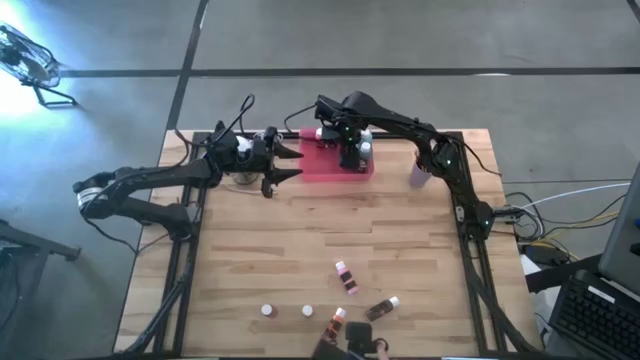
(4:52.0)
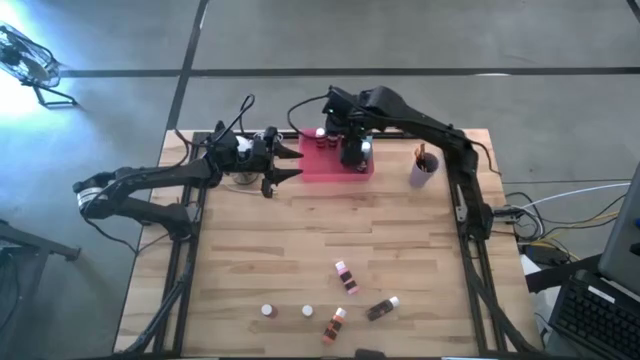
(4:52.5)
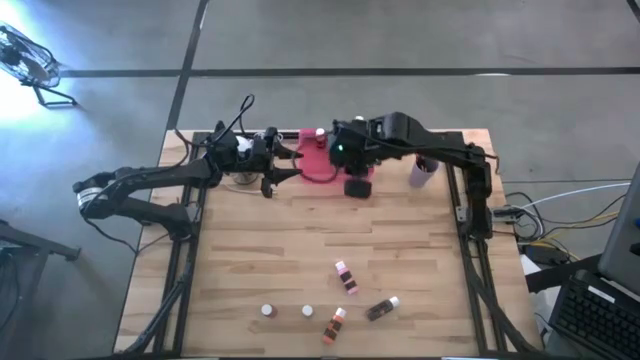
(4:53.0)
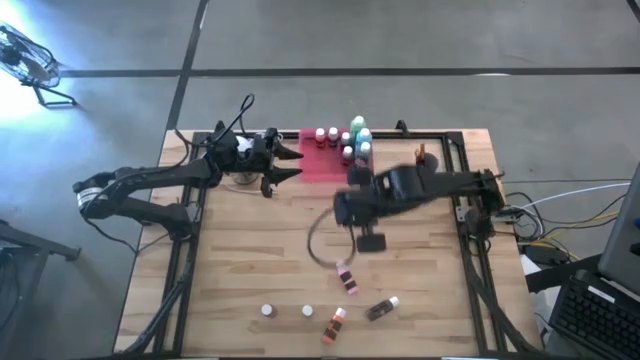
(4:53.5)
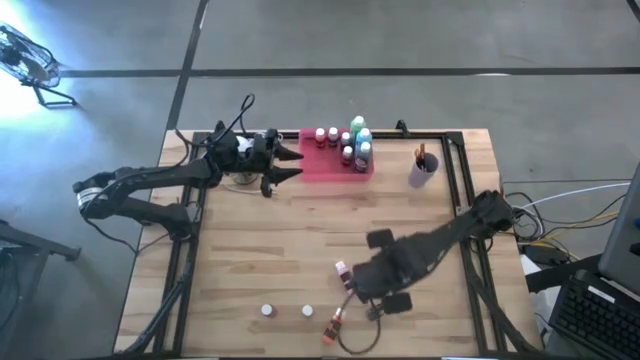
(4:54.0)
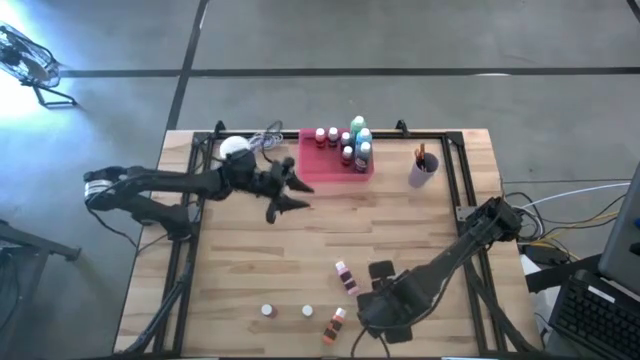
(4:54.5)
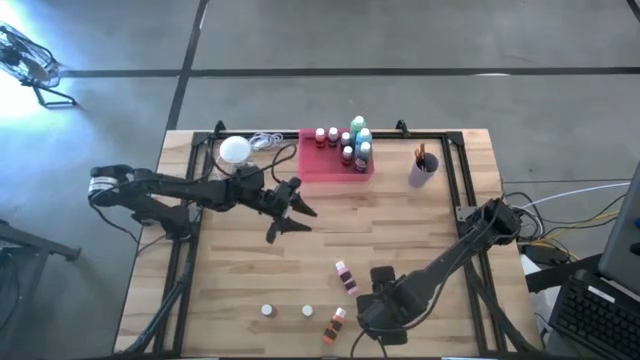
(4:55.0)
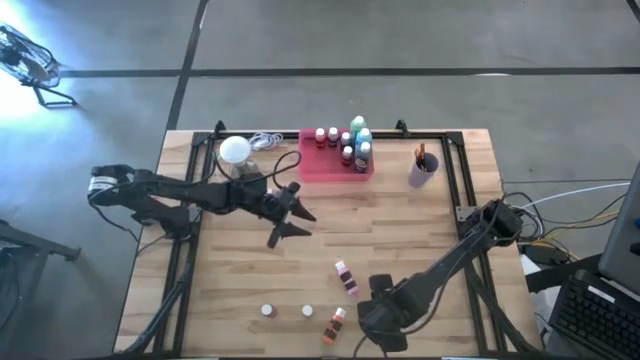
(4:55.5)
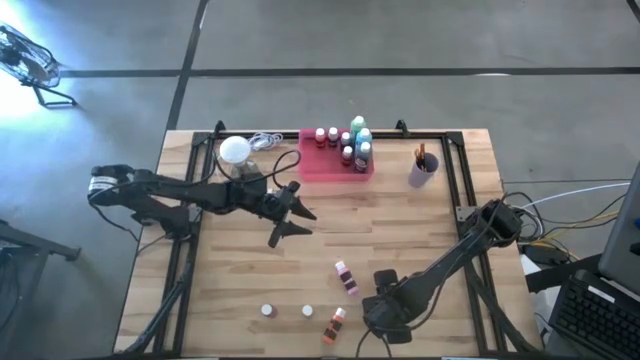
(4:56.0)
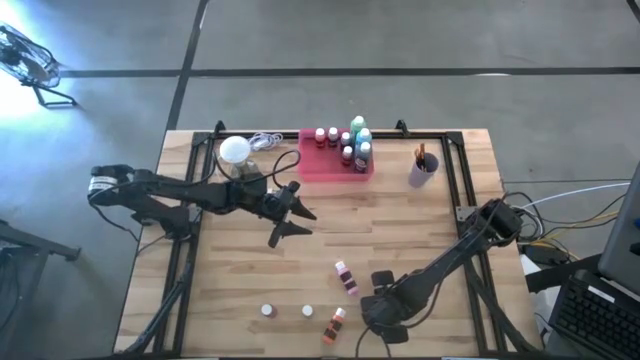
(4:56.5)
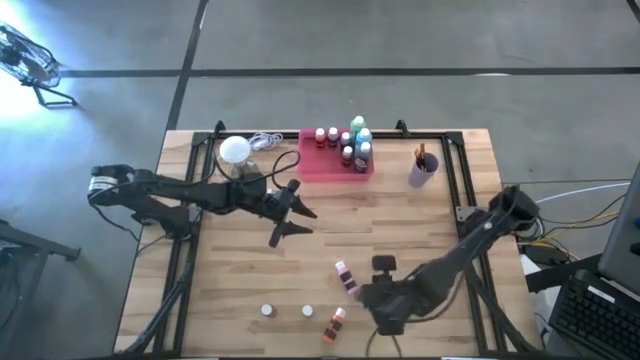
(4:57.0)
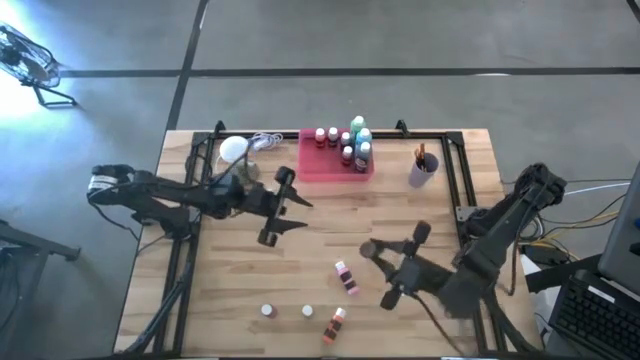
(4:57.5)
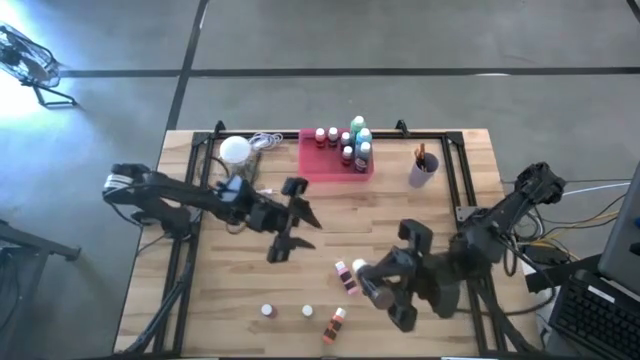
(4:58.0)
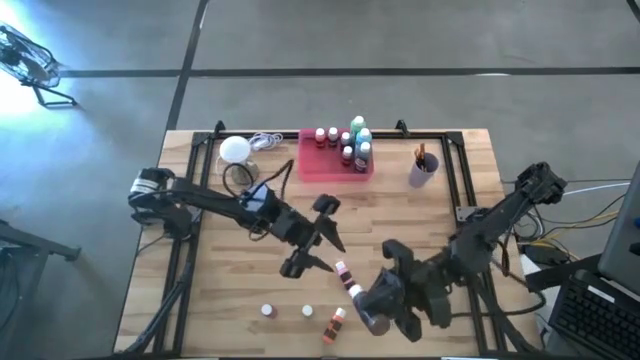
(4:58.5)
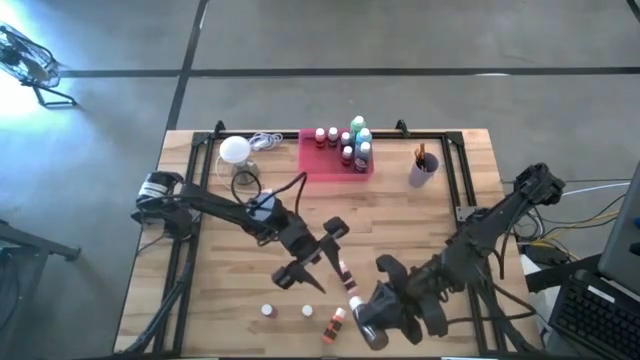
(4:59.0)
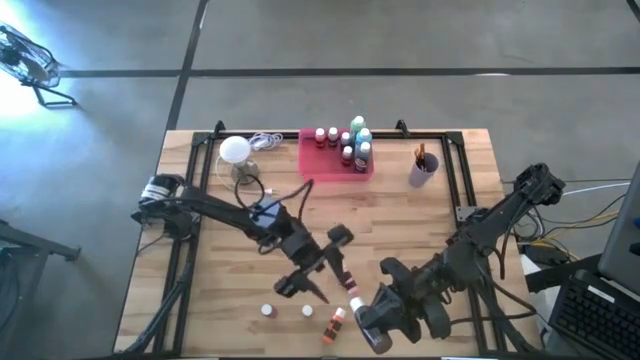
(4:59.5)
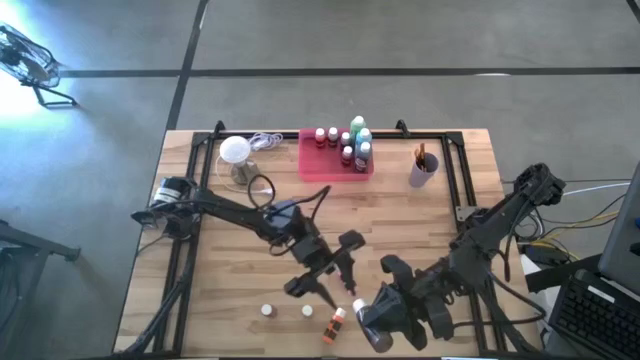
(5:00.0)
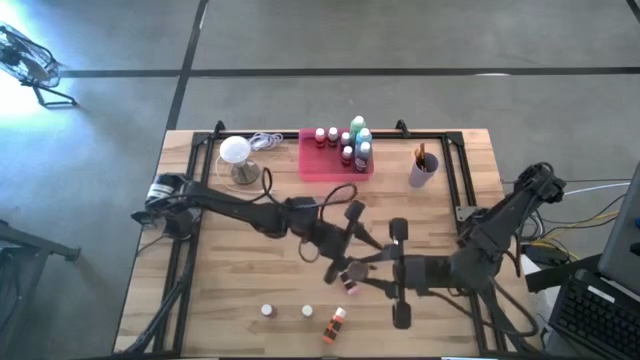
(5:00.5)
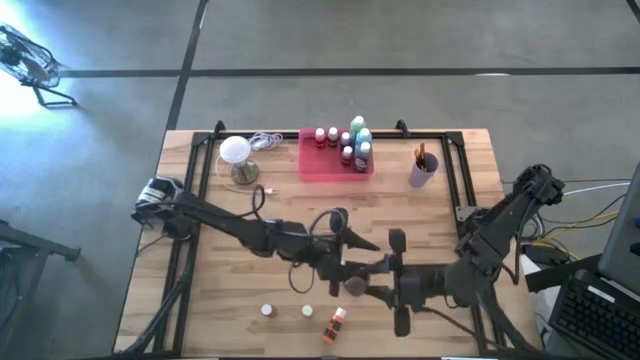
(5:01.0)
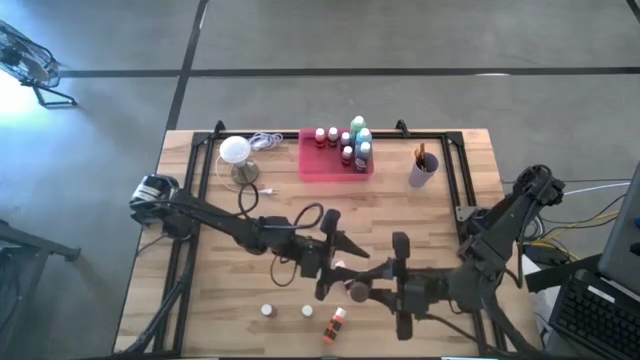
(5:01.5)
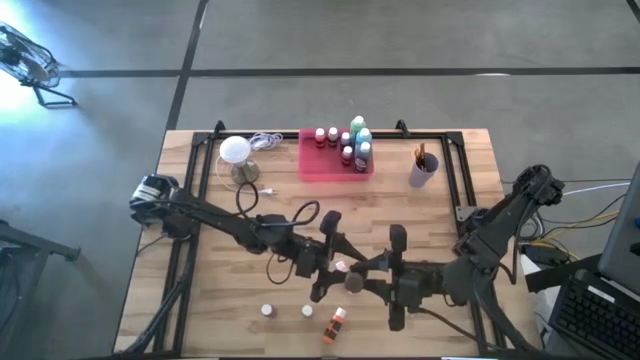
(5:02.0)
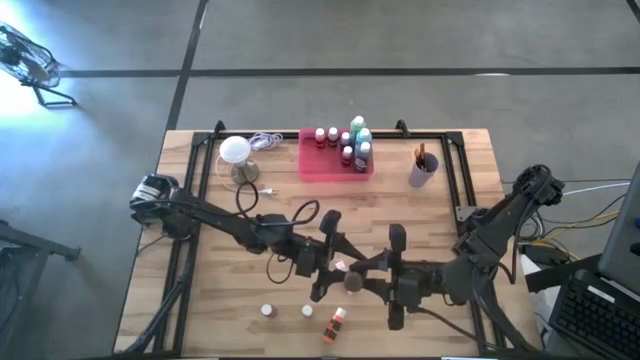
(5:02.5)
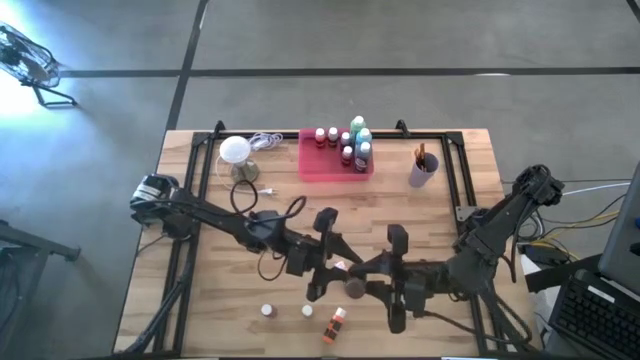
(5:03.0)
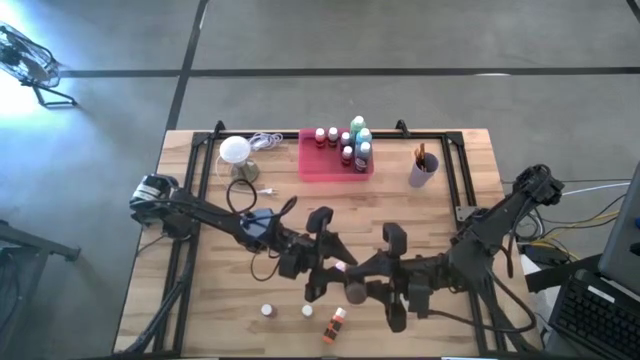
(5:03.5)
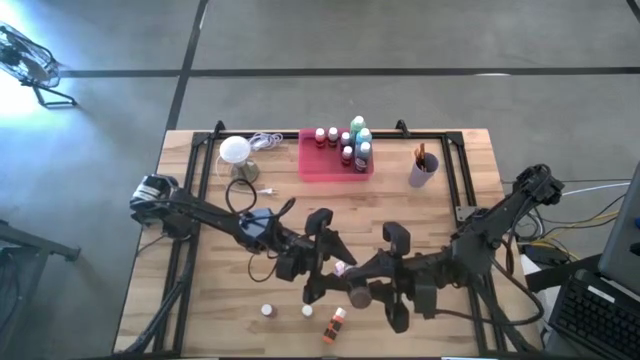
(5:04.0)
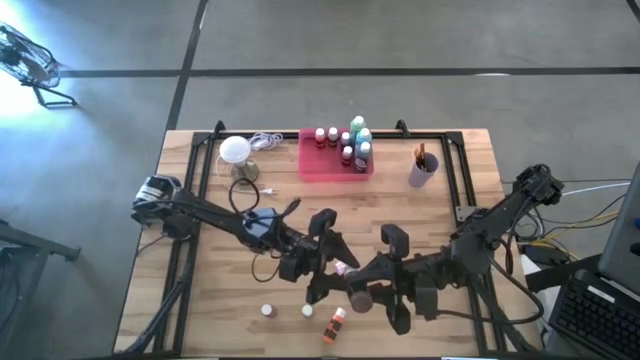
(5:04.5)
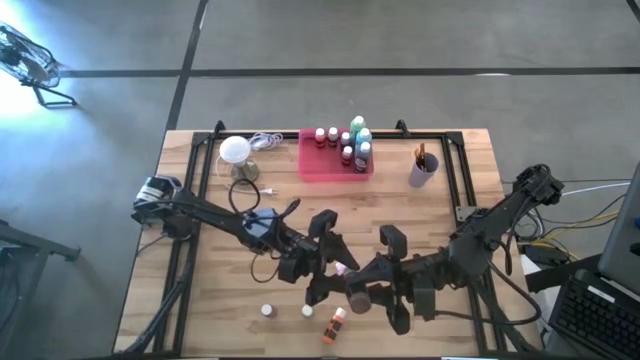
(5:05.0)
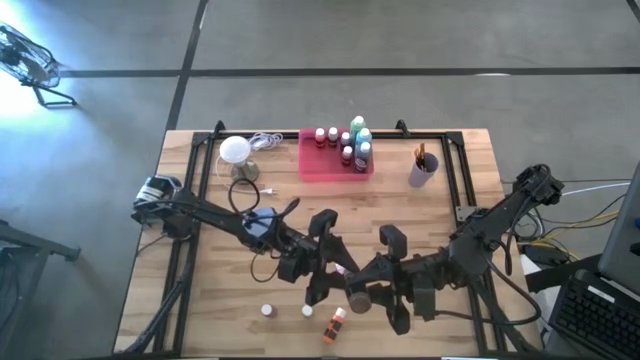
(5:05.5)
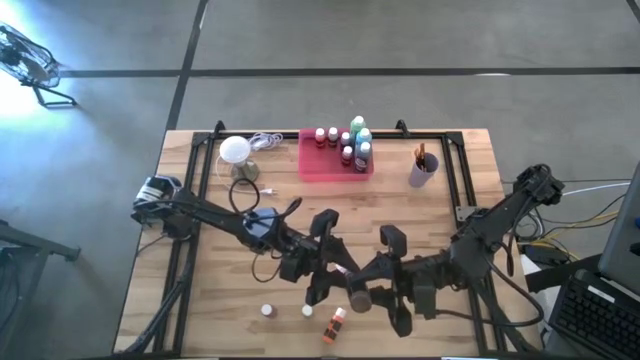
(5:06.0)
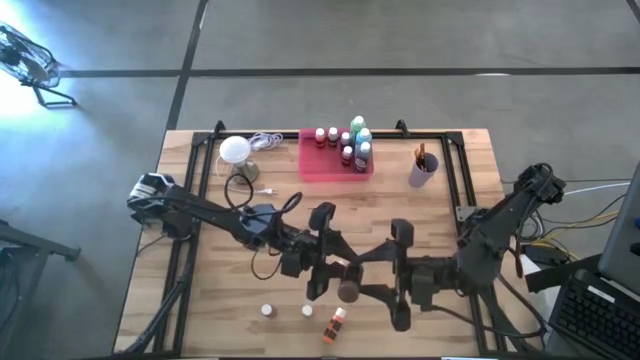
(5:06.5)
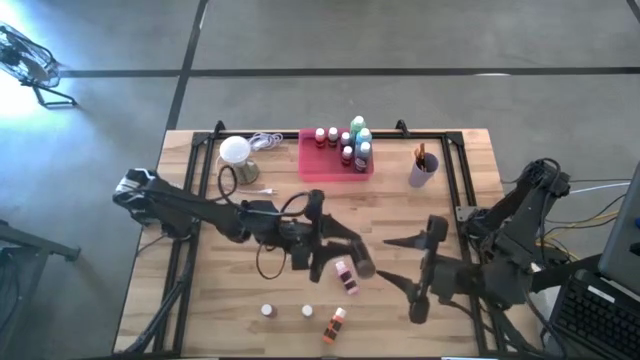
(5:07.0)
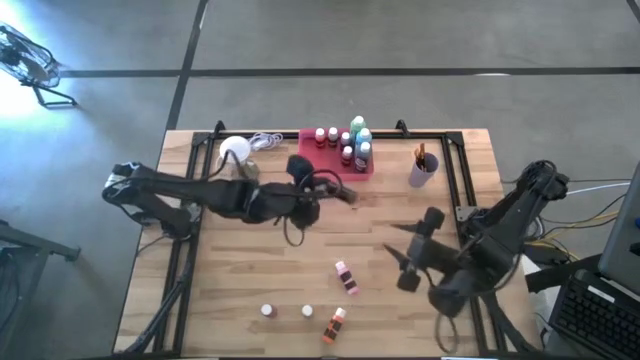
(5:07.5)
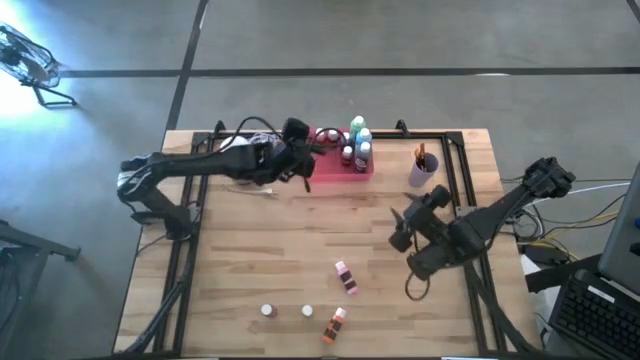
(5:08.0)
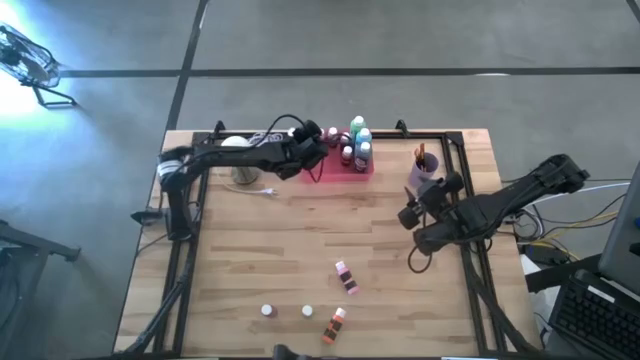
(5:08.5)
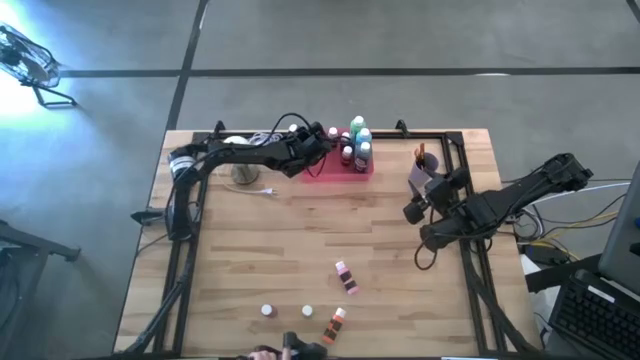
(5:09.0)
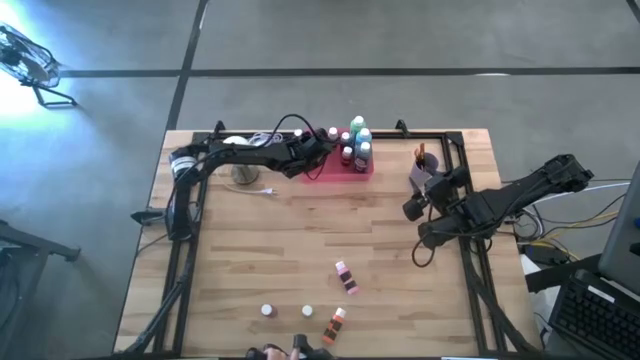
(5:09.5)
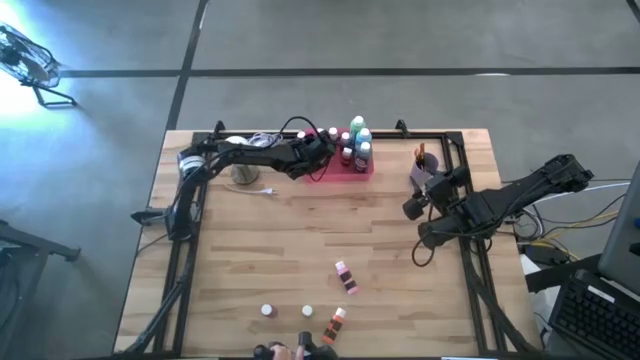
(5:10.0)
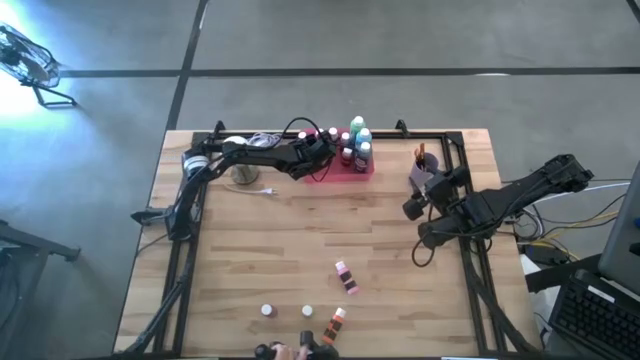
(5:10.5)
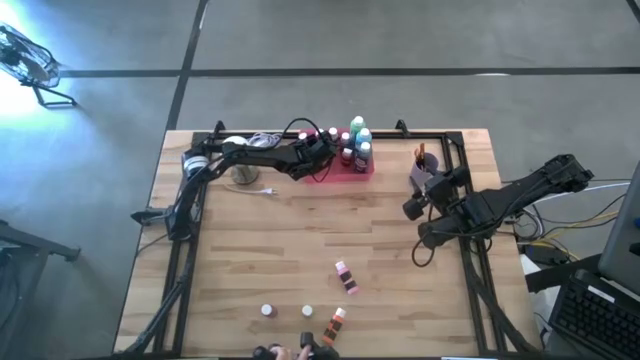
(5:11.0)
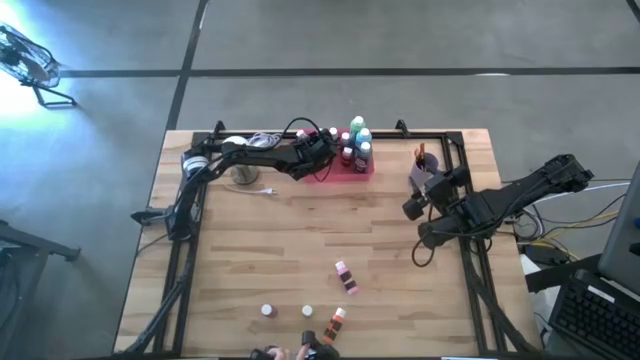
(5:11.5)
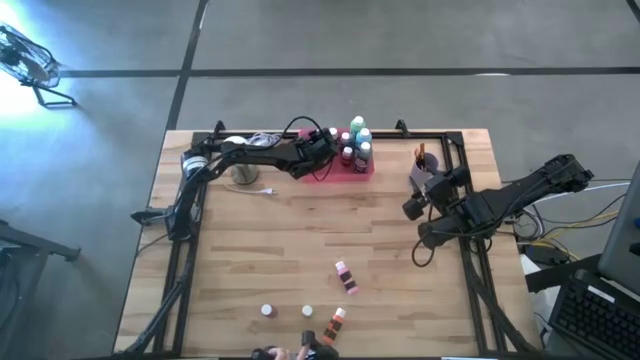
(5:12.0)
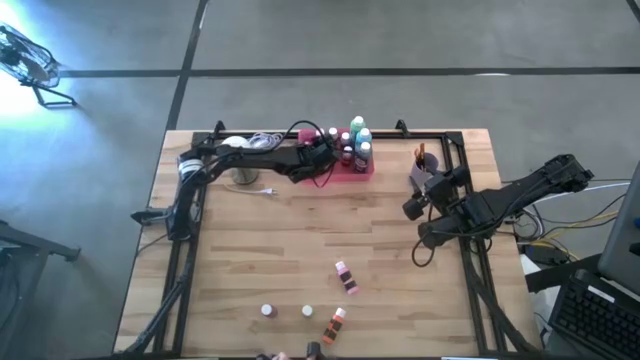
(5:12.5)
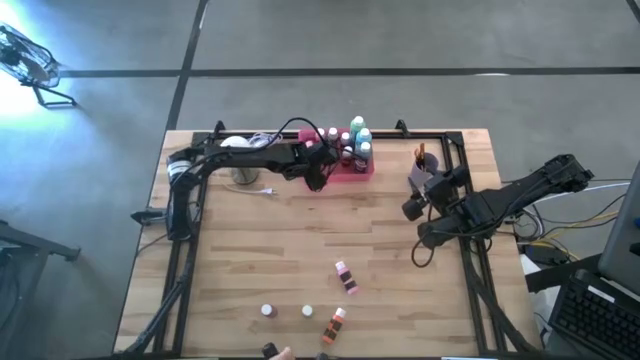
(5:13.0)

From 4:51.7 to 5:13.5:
Task: Pick & Place Paint Supplies
Put the dark brown black paint bottle into the pink bin

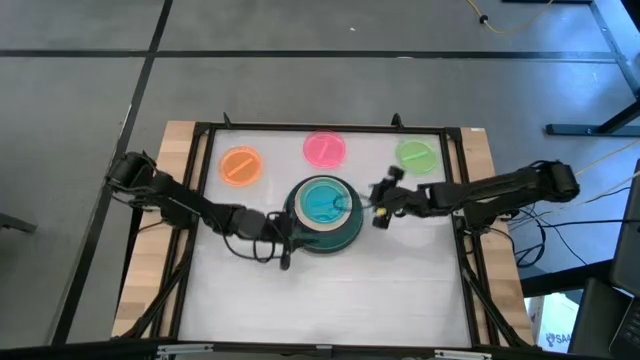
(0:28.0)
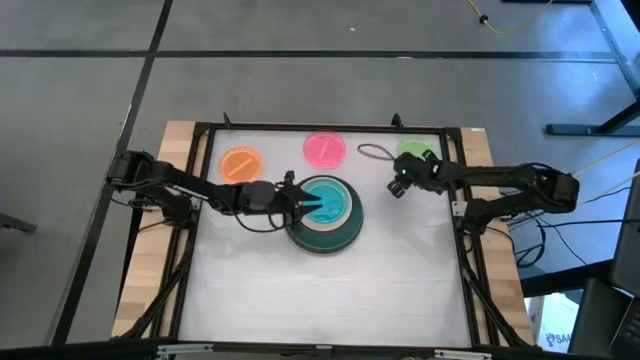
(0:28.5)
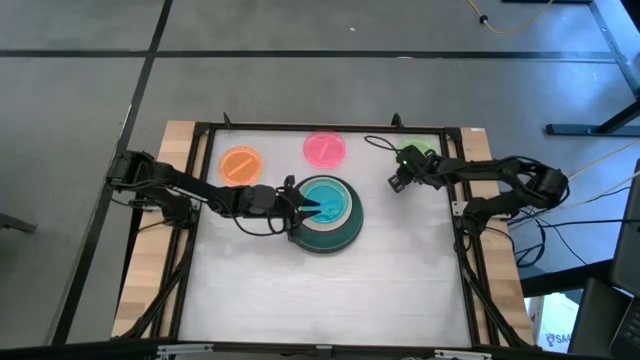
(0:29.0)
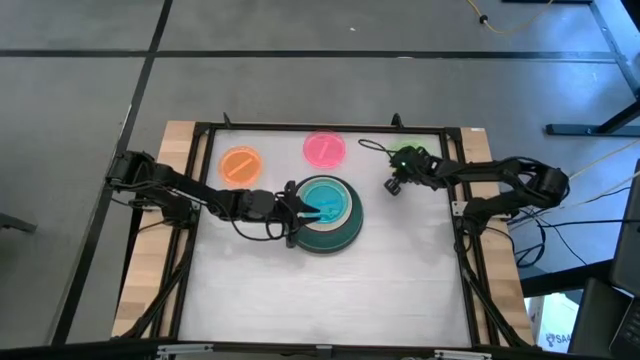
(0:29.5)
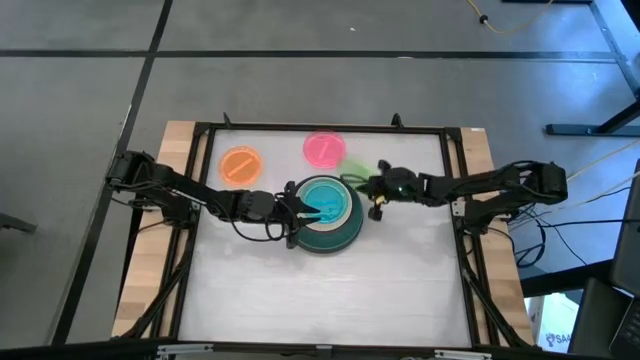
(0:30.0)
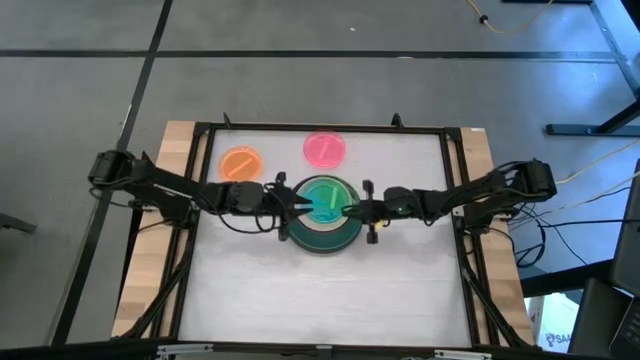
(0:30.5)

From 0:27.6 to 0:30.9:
Task: Stack plastic plates
Stack the small light green plate on top of the small blue plate
